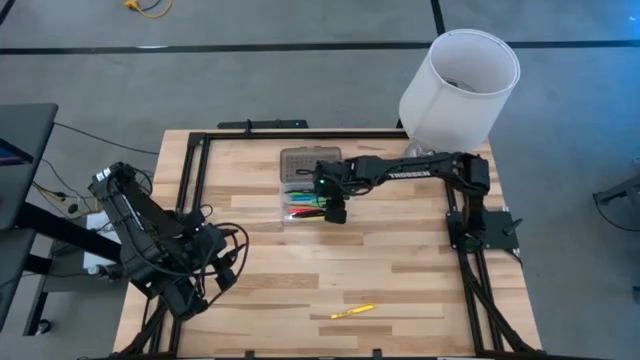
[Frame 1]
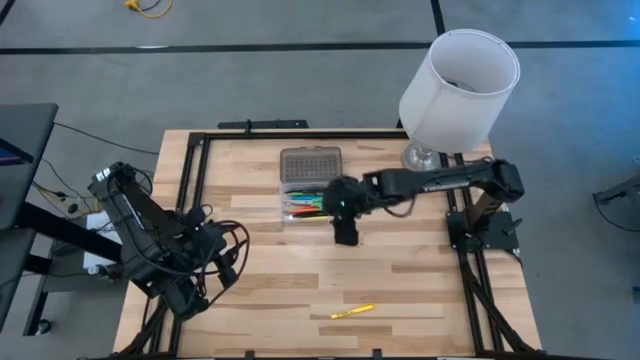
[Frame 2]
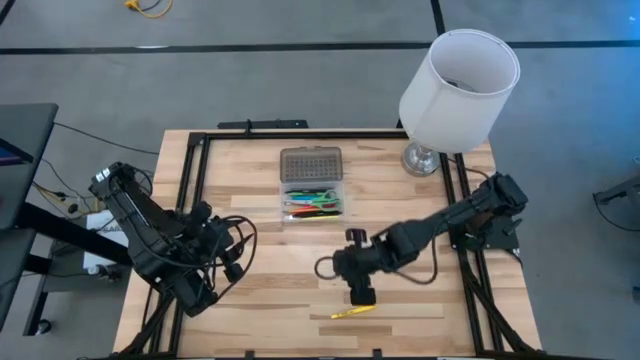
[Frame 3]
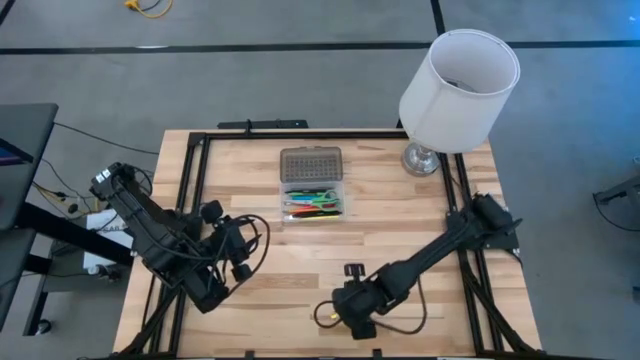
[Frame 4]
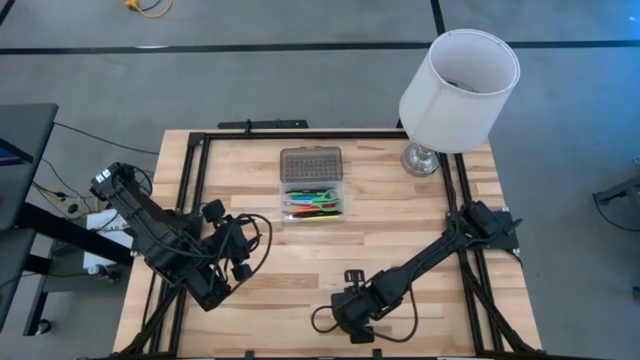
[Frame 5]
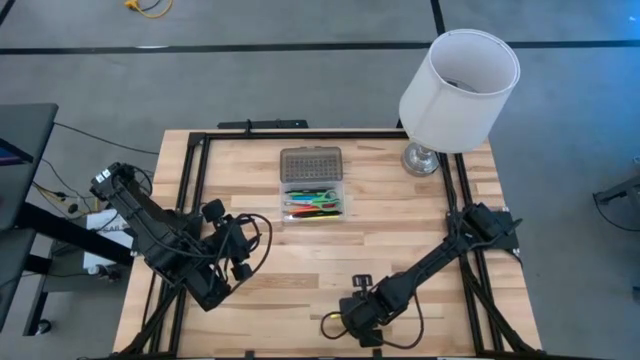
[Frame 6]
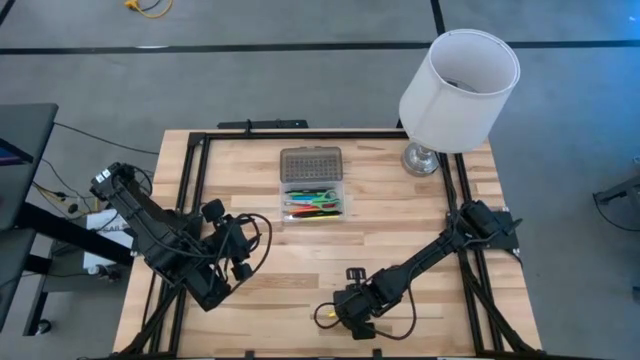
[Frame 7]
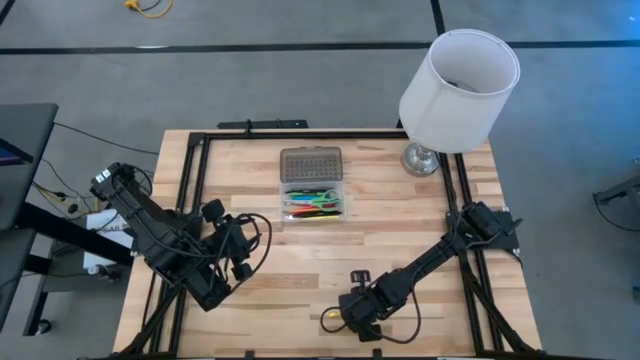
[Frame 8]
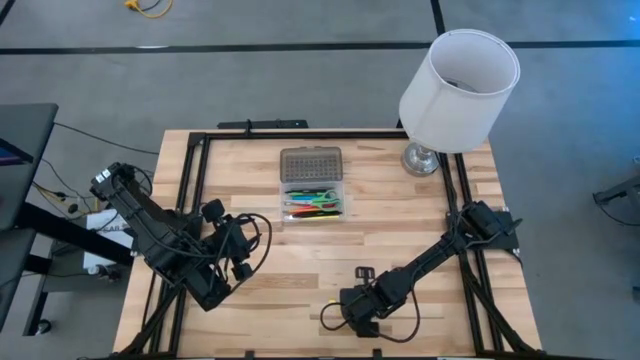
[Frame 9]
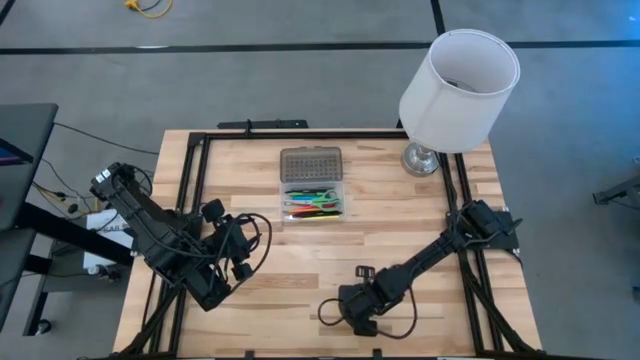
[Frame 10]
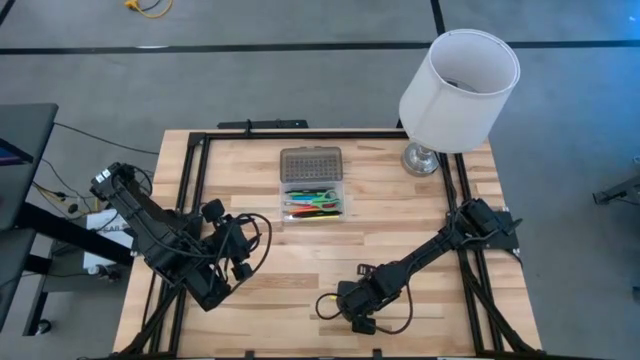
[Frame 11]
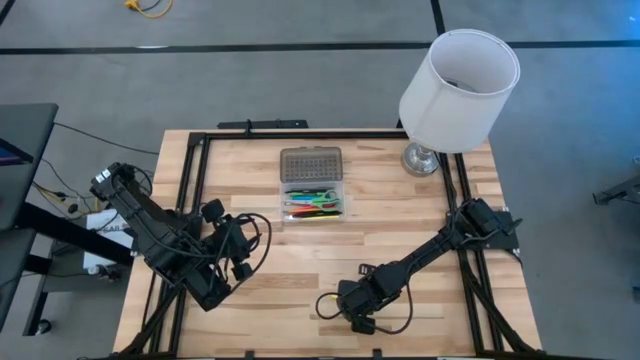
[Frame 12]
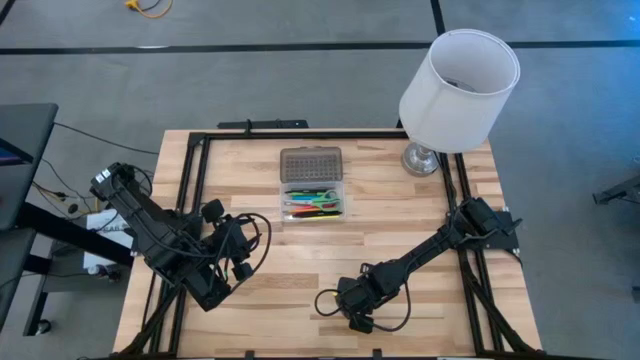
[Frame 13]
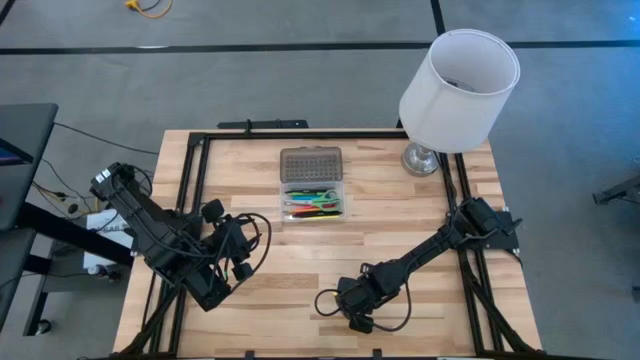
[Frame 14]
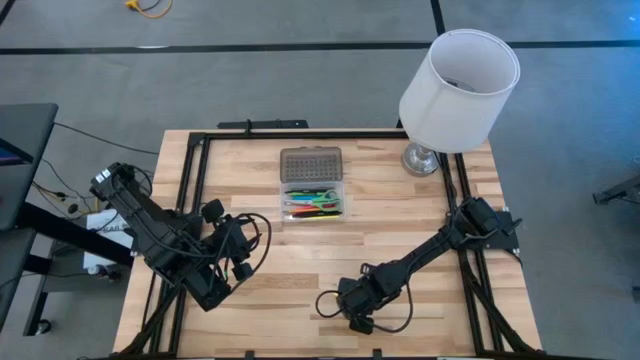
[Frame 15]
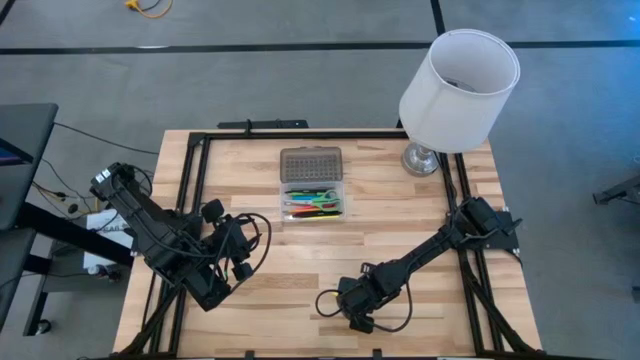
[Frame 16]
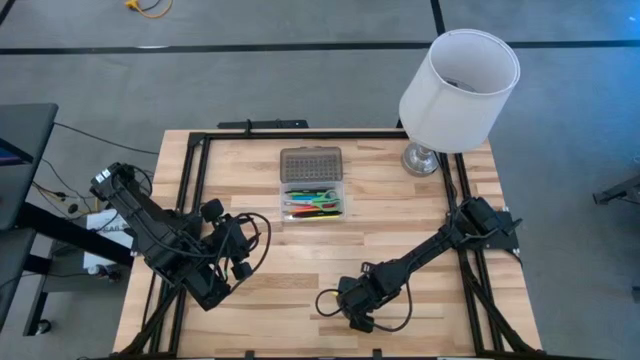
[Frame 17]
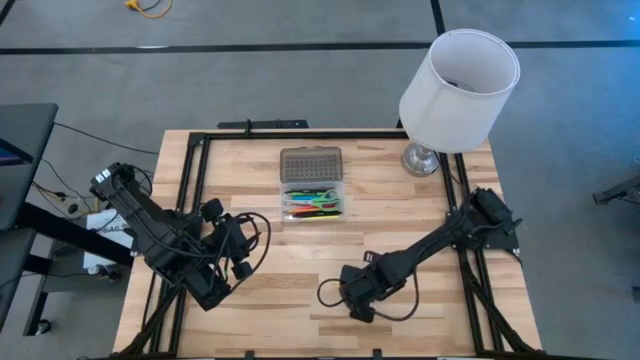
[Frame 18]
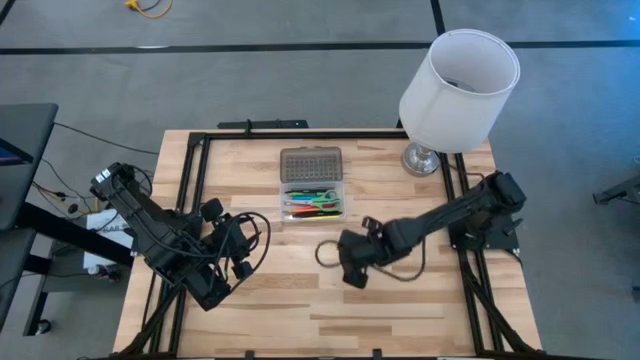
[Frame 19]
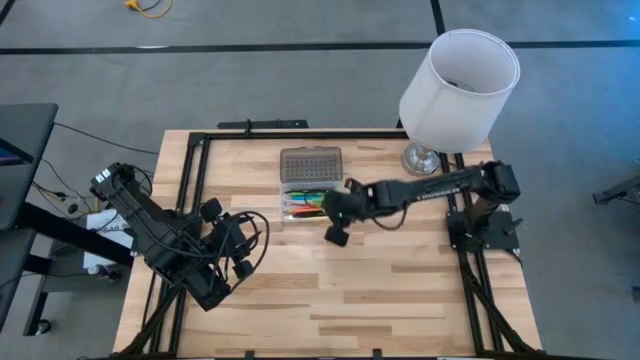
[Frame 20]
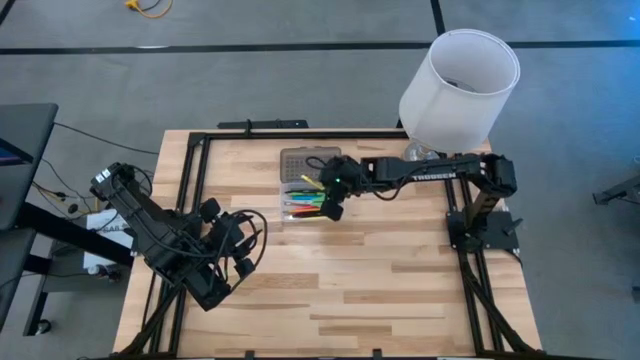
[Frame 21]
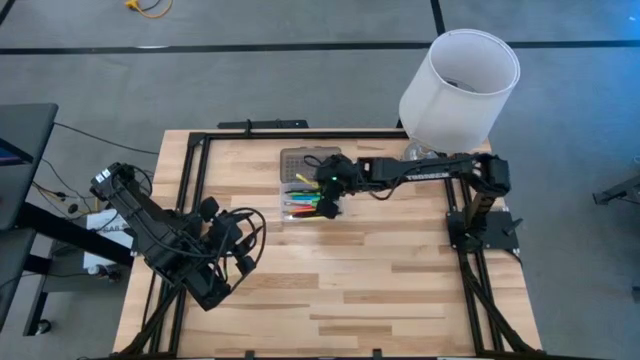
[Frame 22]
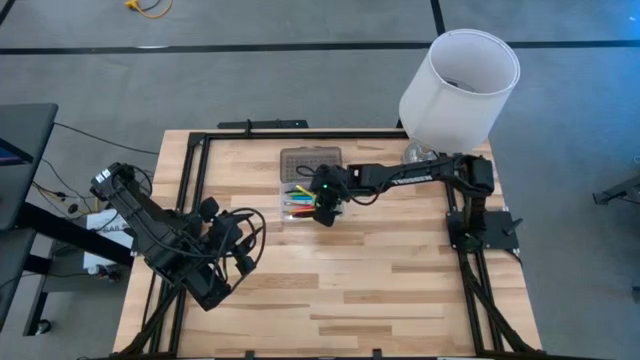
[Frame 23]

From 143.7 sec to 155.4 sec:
Task: Pick & place school supplies into a supply box
Put the yellow marker pen into the supply box

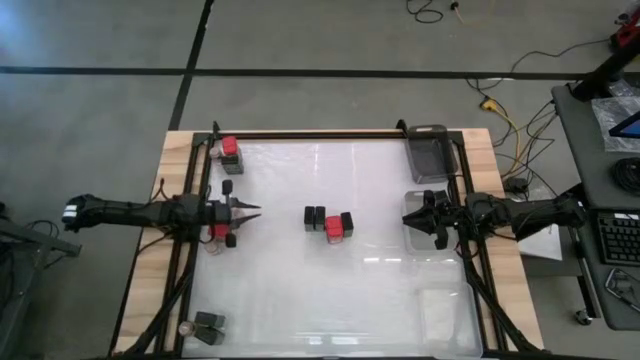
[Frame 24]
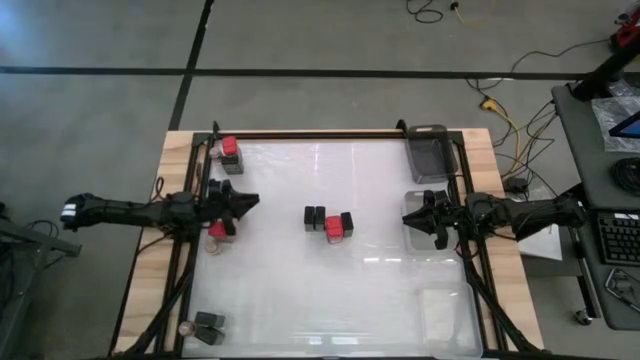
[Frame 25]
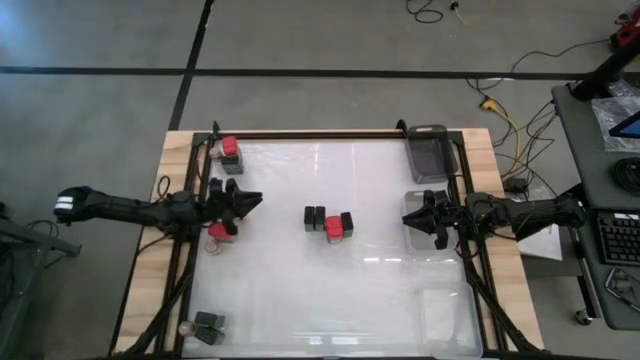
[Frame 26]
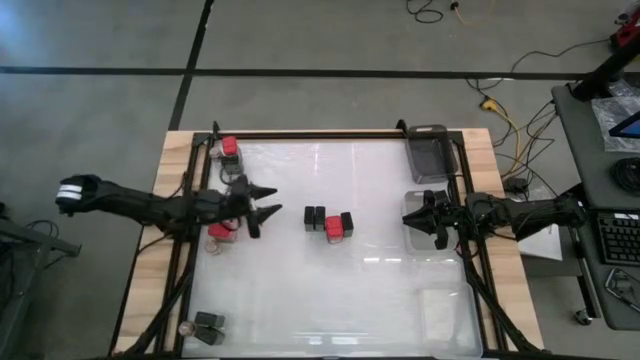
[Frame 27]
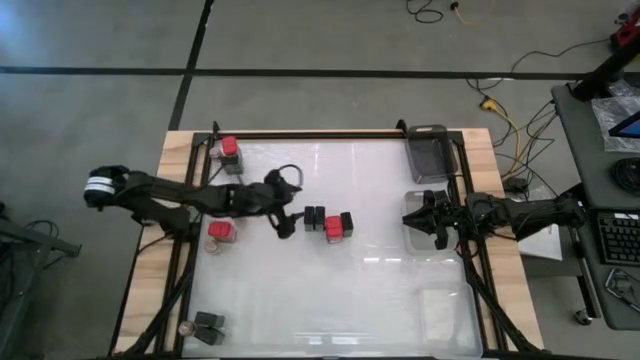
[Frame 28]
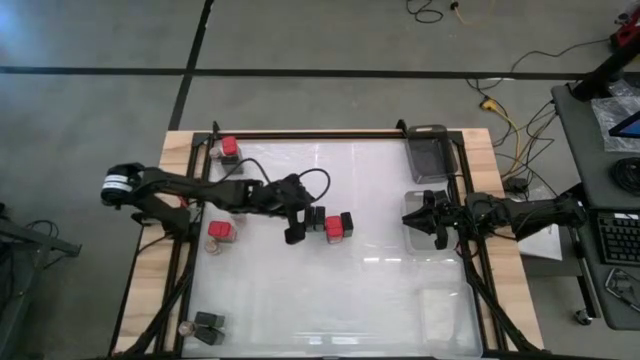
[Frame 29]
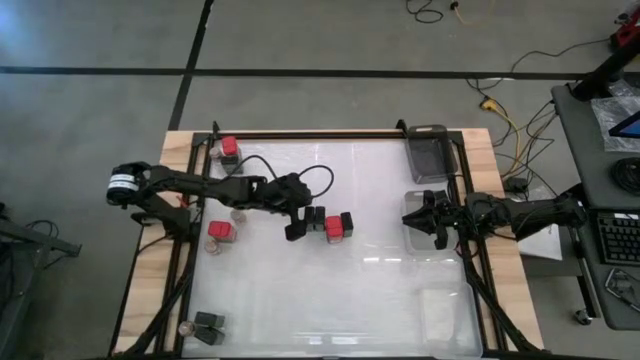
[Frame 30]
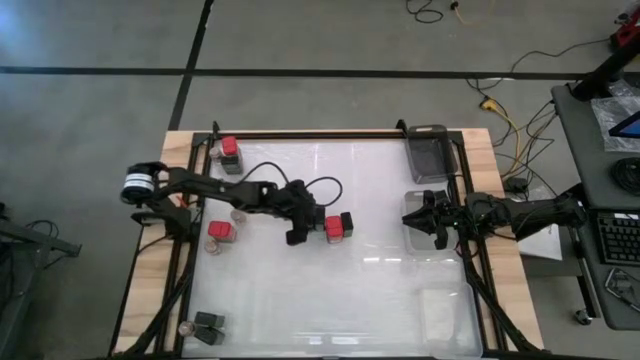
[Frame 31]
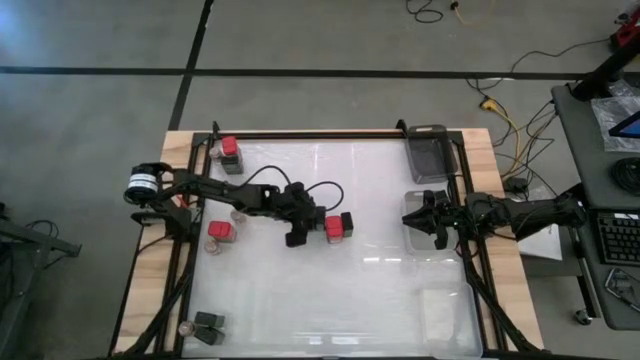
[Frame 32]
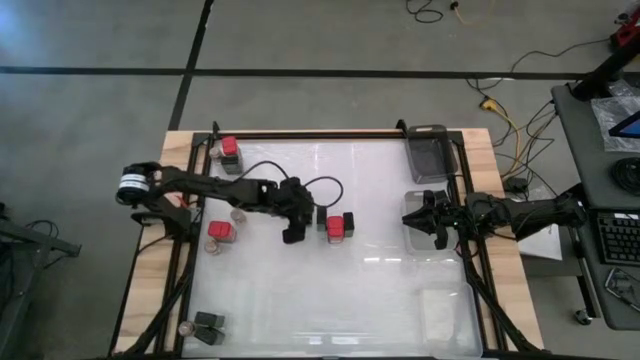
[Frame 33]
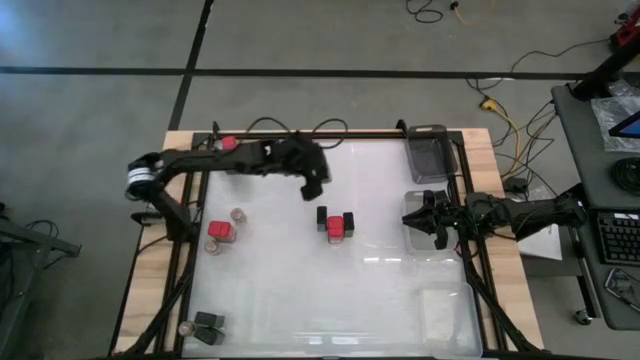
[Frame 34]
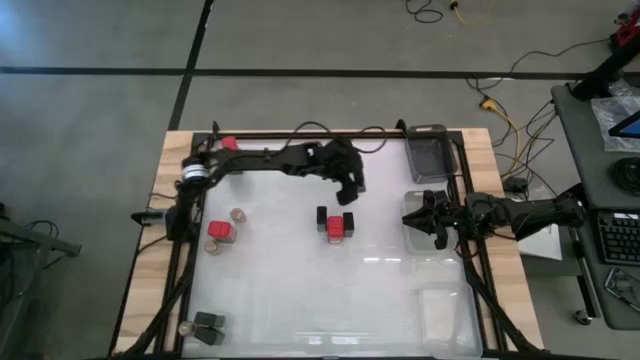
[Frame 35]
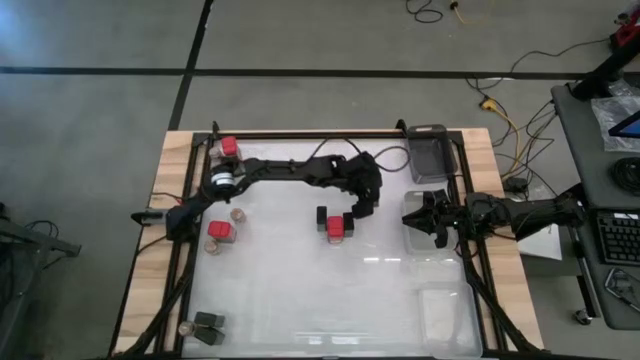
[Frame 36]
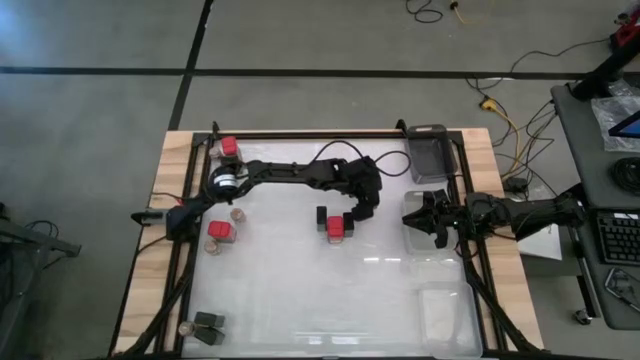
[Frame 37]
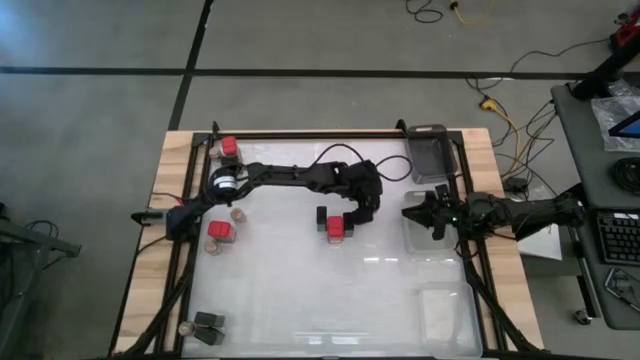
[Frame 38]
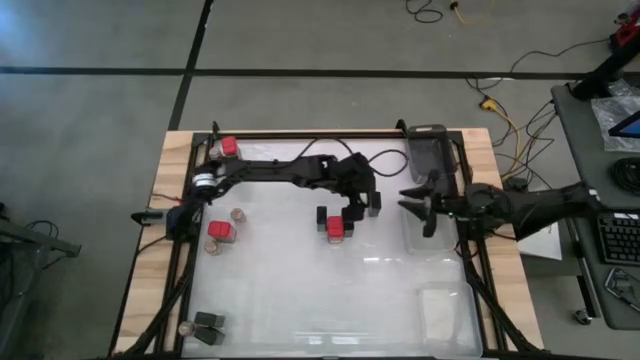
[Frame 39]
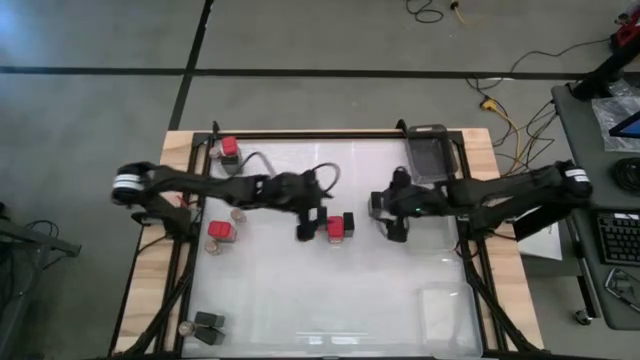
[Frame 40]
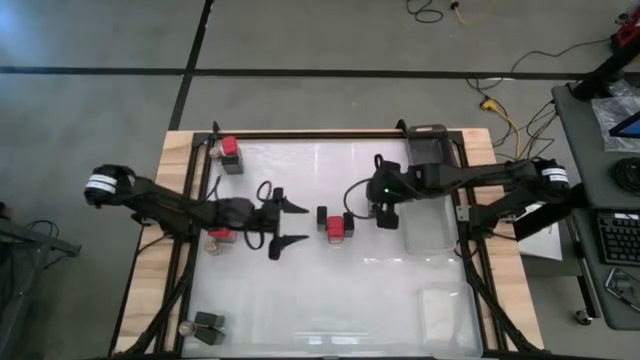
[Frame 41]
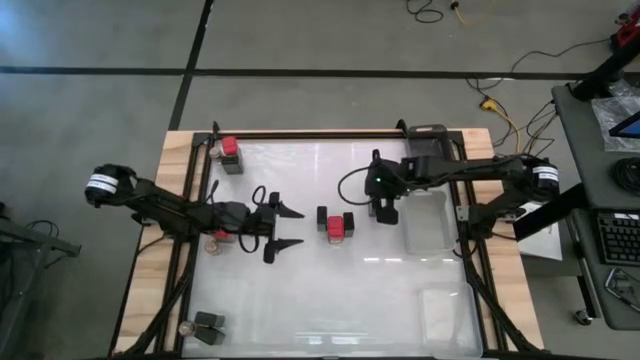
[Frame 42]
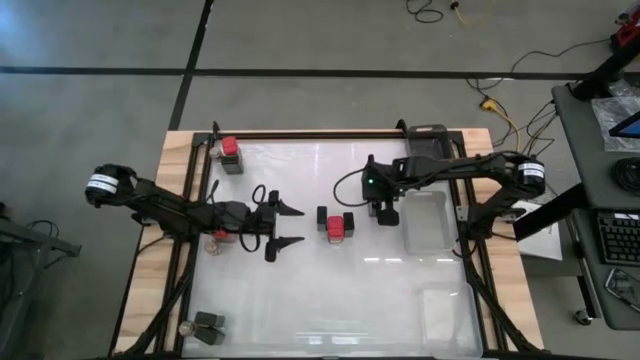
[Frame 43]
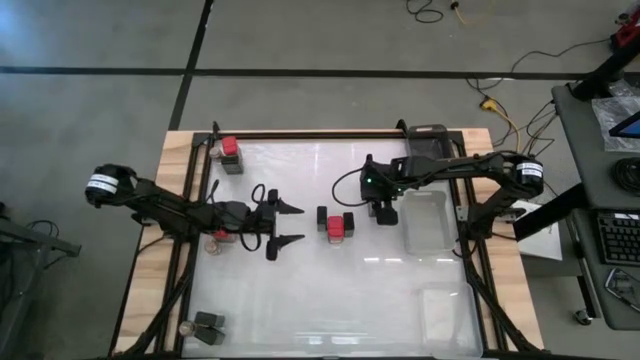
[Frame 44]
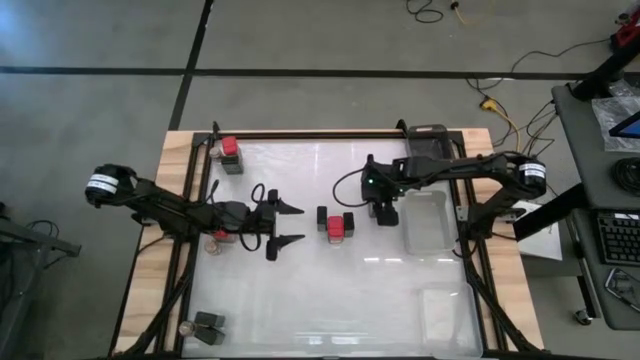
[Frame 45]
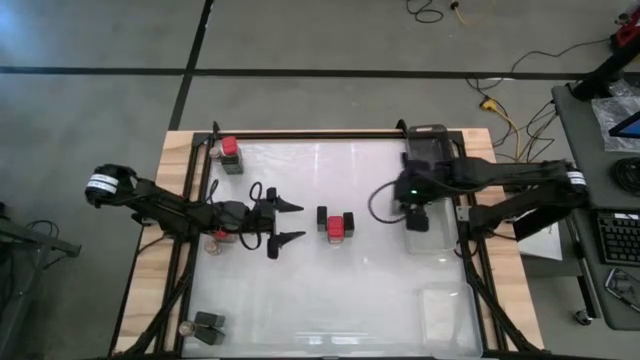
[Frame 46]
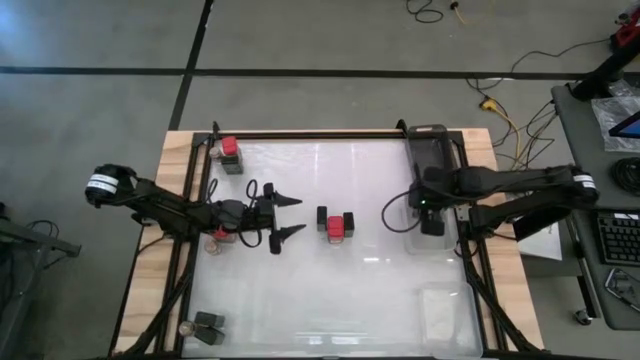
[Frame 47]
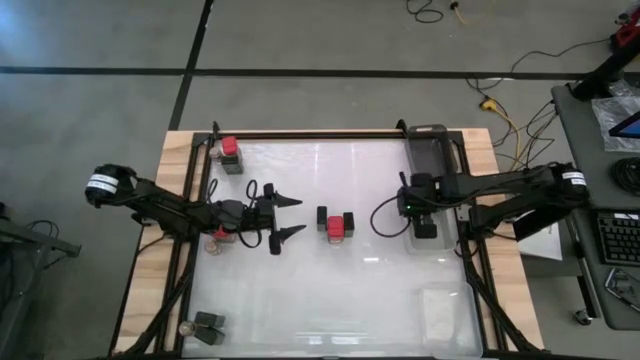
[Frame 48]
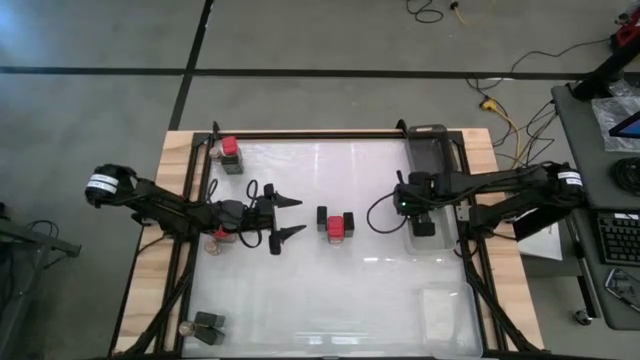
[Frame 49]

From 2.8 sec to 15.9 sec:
Task: Sort spices by type
Put the green seasoning can into the gray bin
